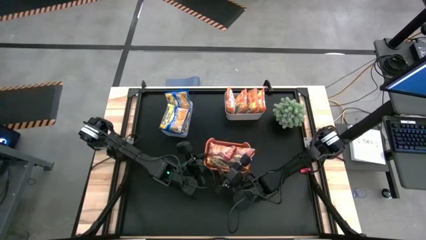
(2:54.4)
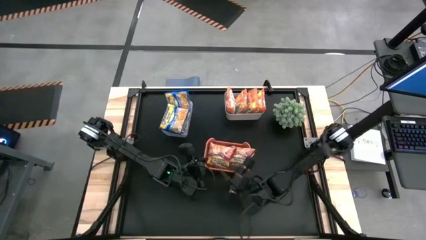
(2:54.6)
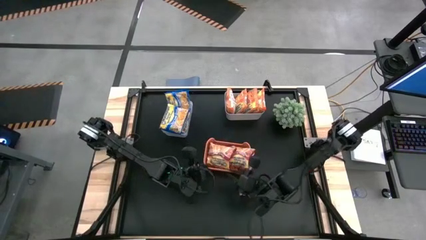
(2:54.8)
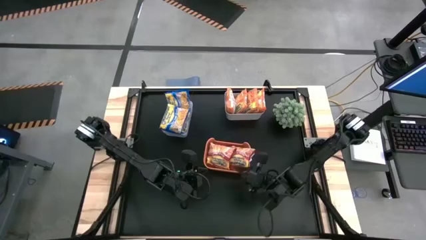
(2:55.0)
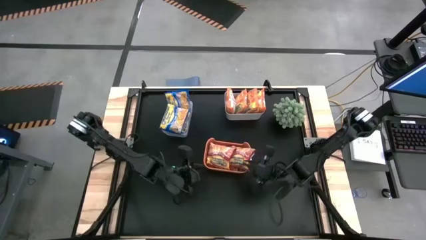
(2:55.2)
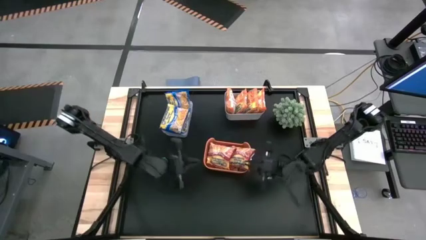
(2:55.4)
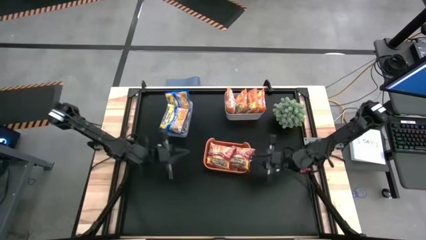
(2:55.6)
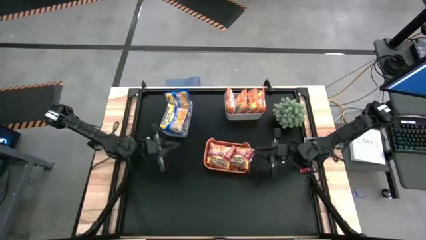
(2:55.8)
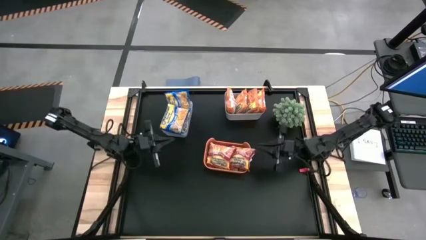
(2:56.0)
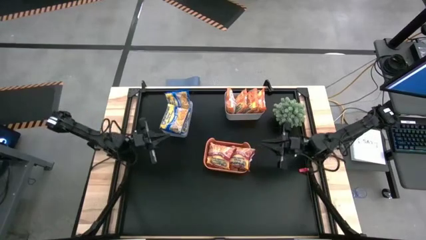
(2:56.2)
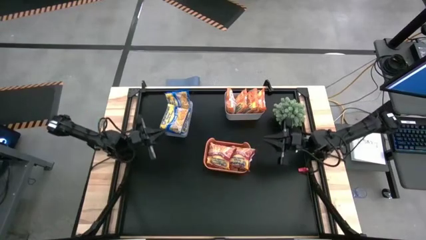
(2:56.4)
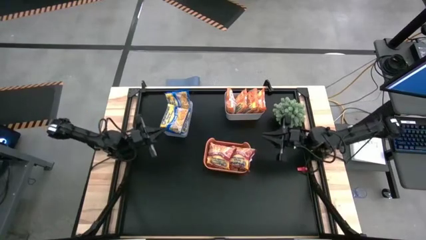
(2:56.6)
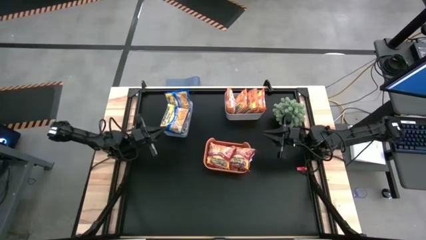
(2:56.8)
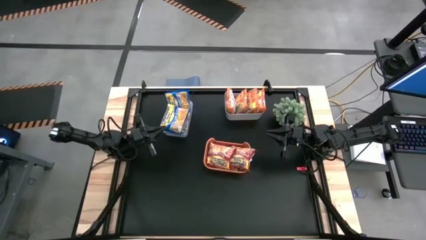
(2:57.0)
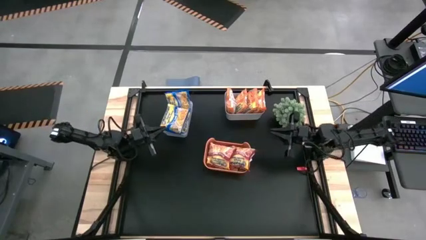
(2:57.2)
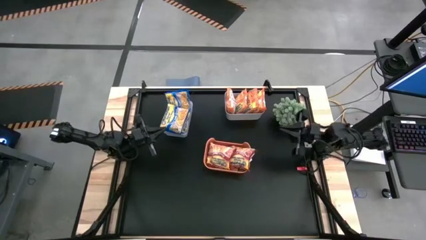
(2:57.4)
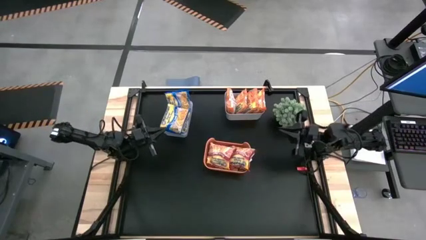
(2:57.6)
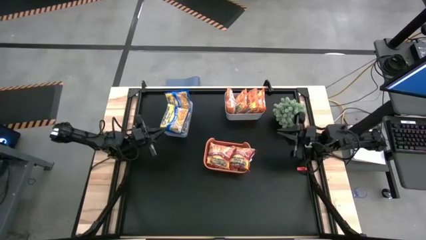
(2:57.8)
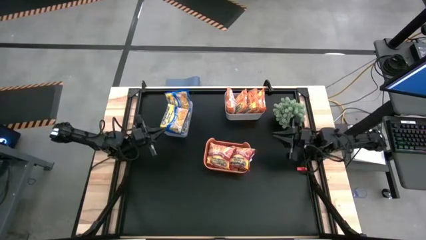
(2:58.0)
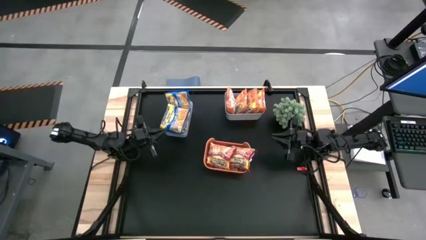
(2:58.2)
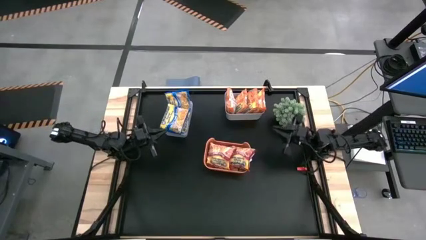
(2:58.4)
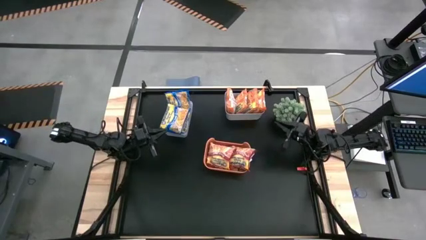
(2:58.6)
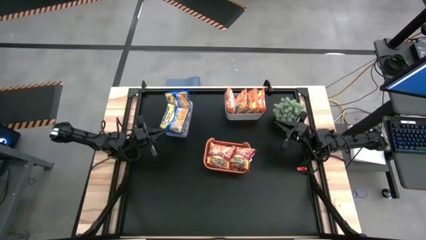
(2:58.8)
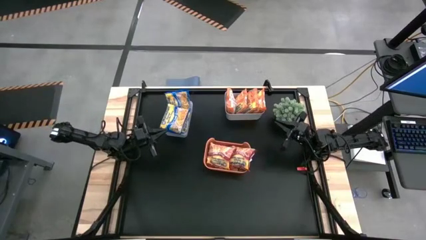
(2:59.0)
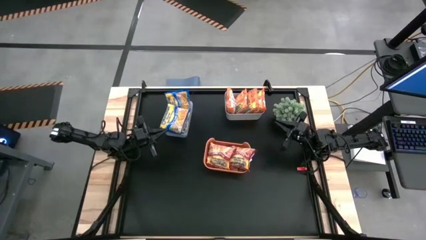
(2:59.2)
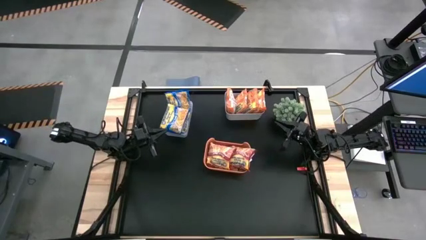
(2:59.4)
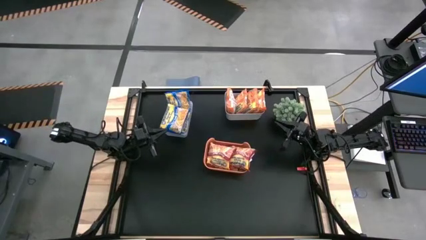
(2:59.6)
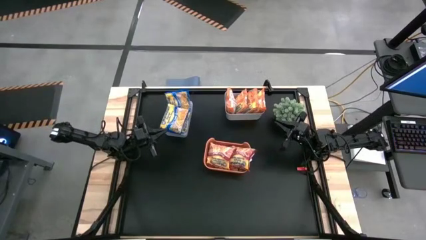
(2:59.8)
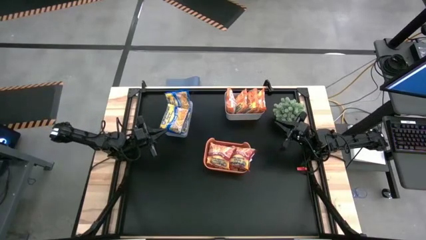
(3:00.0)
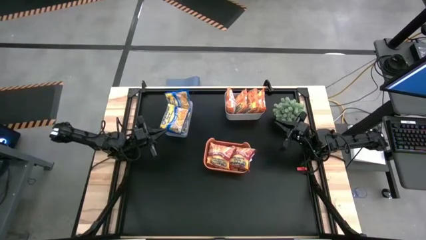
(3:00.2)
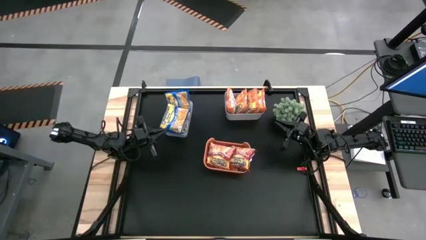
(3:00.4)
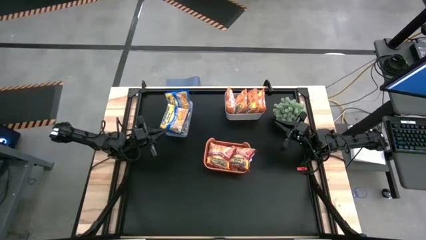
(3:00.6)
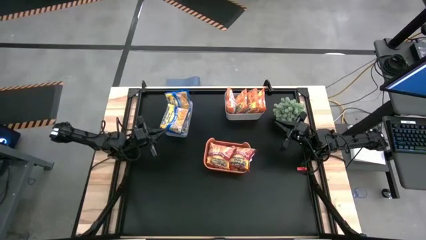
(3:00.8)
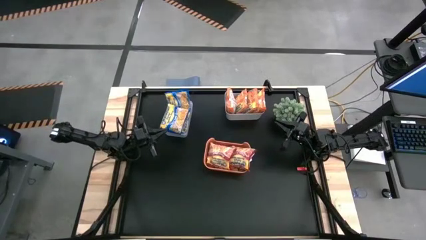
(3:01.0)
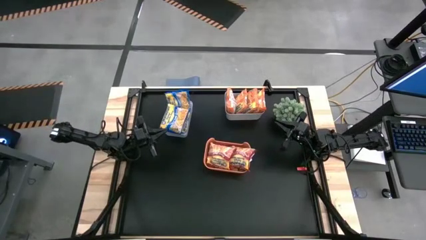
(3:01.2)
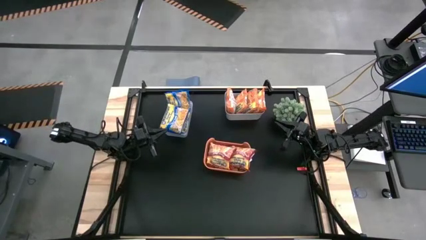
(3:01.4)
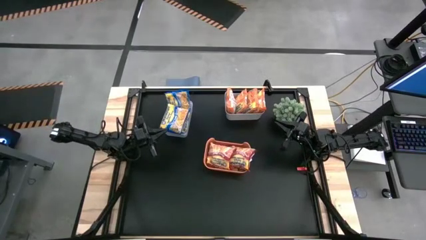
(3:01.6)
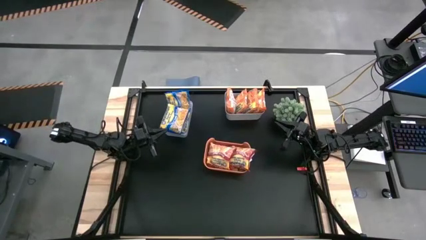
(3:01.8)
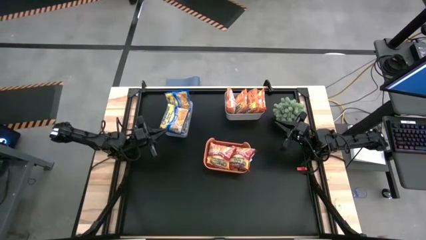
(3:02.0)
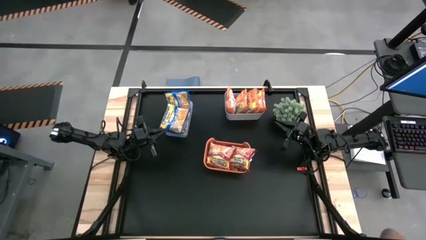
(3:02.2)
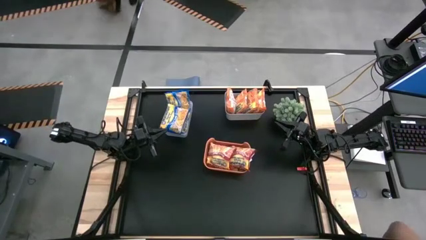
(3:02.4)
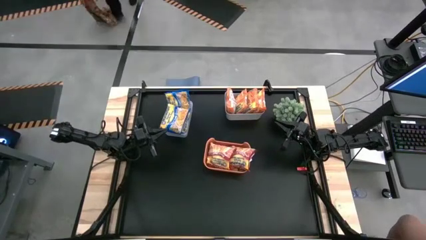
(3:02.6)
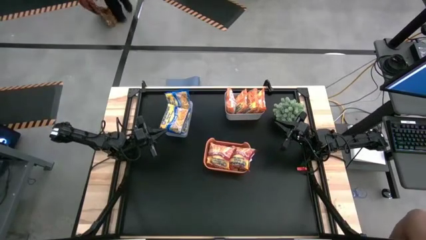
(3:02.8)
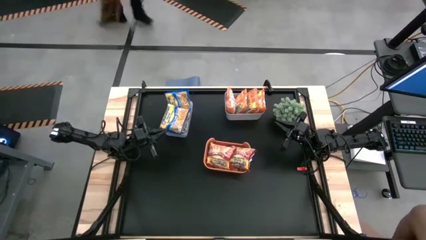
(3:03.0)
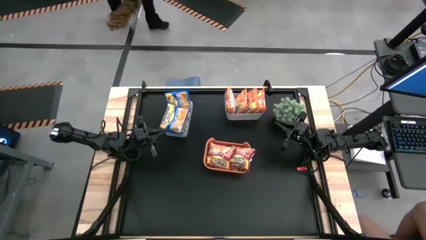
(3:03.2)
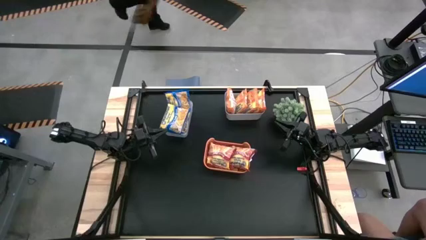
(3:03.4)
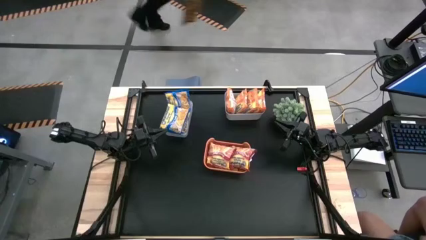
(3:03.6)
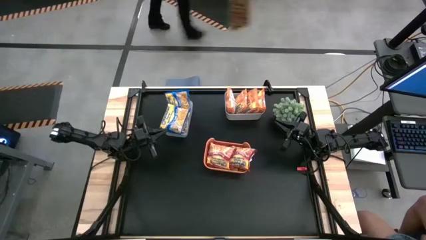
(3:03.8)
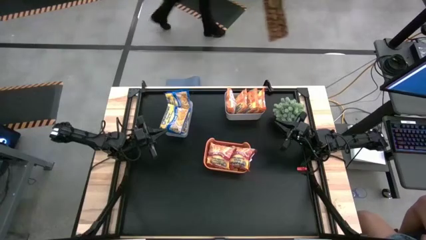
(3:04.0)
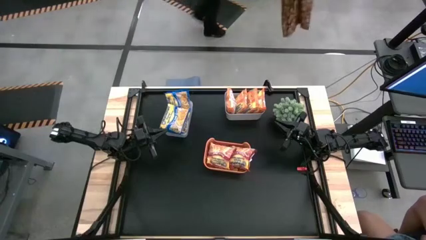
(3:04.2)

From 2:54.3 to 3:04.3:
Task: Sort Maruchan noodles
Return to Home Position
